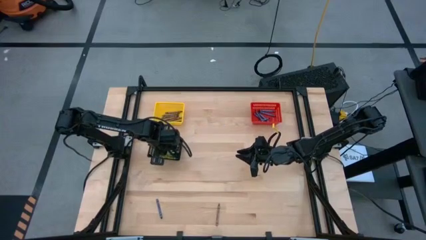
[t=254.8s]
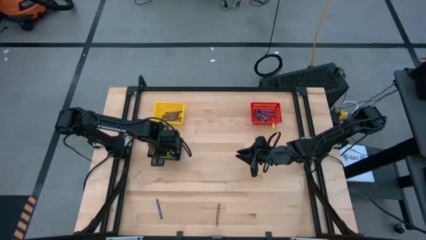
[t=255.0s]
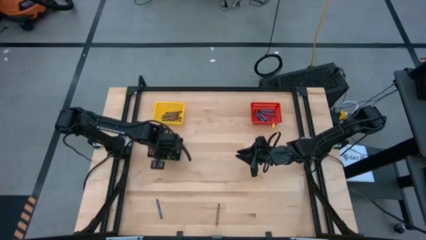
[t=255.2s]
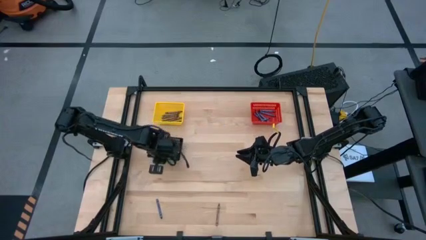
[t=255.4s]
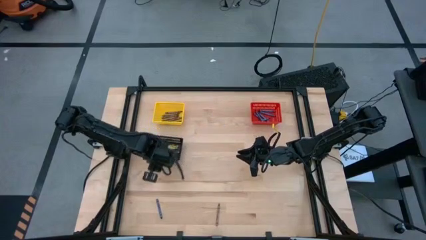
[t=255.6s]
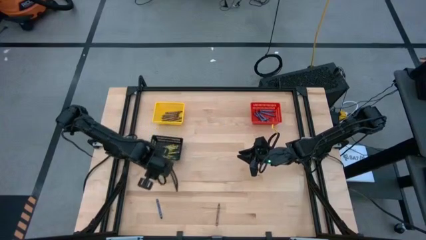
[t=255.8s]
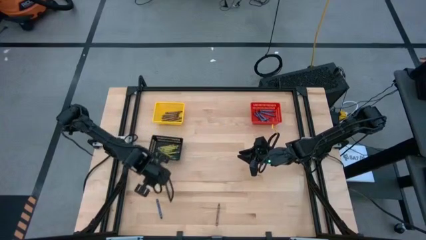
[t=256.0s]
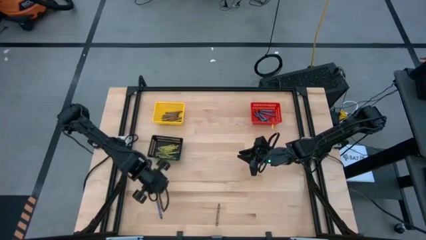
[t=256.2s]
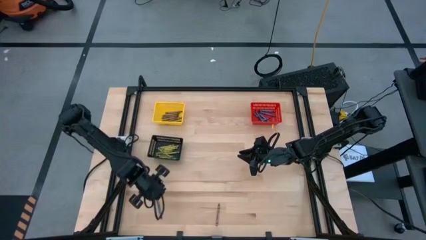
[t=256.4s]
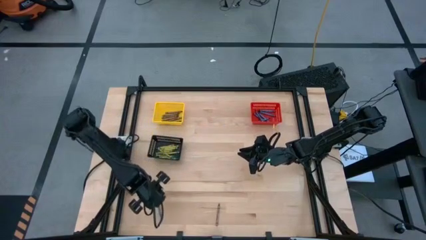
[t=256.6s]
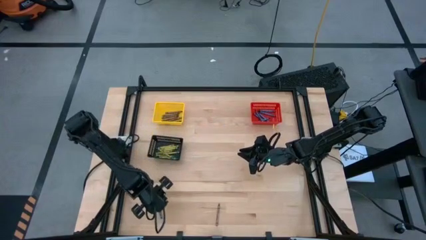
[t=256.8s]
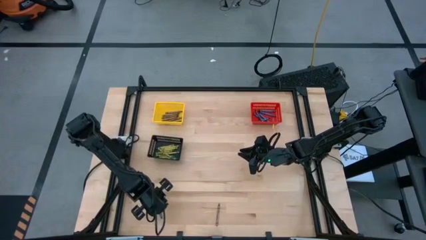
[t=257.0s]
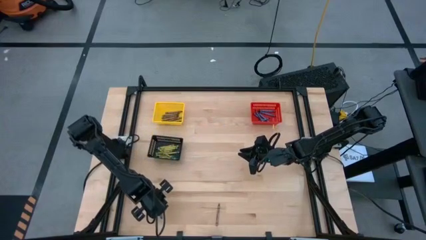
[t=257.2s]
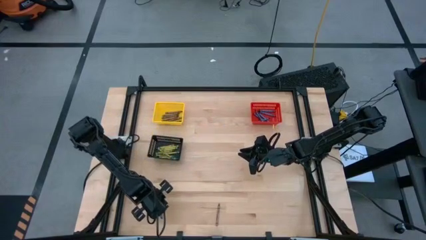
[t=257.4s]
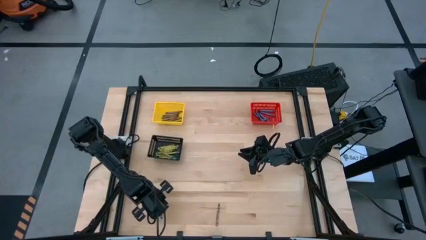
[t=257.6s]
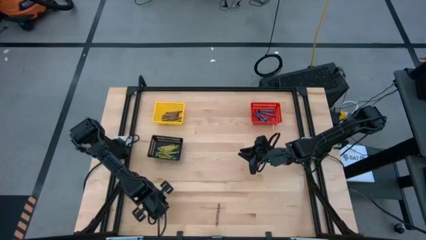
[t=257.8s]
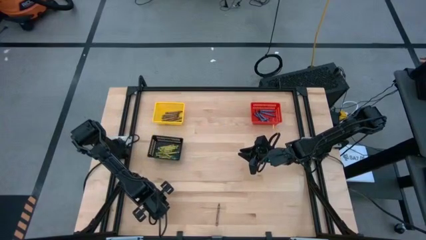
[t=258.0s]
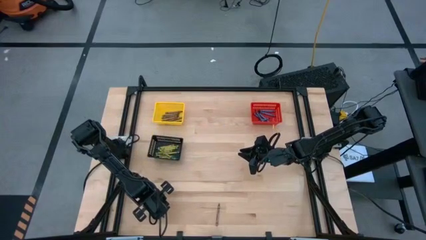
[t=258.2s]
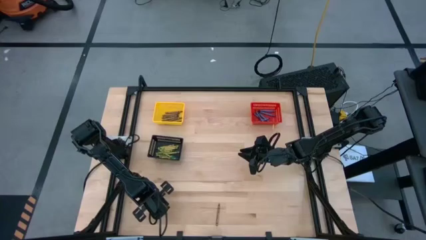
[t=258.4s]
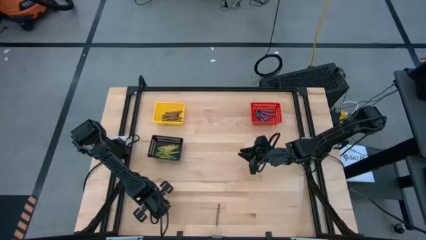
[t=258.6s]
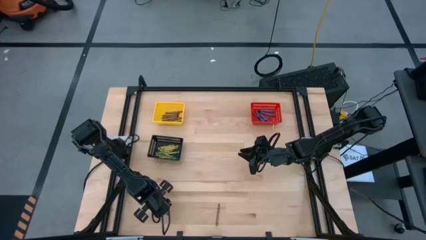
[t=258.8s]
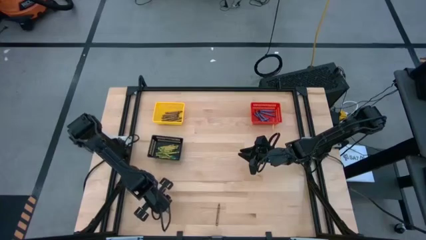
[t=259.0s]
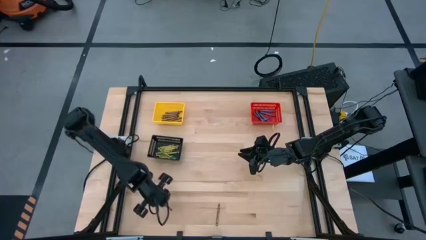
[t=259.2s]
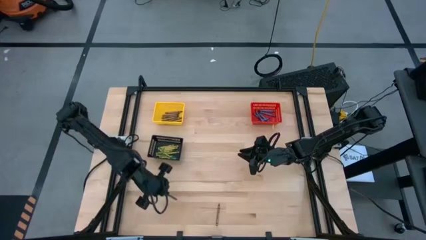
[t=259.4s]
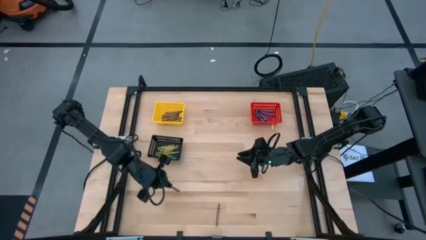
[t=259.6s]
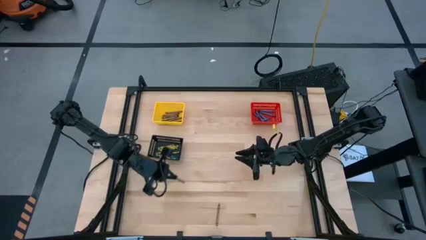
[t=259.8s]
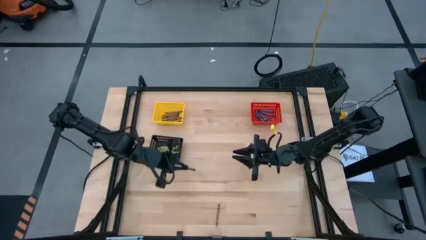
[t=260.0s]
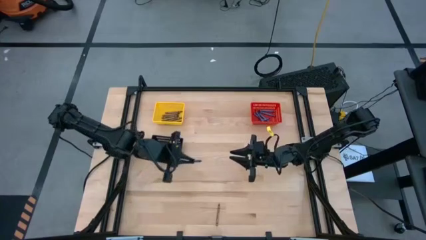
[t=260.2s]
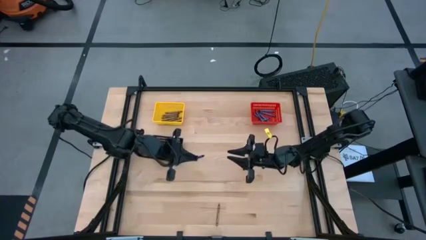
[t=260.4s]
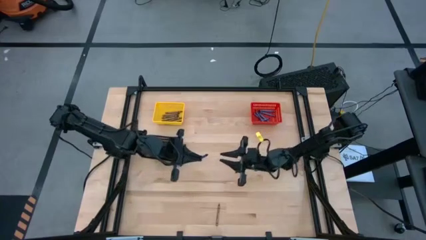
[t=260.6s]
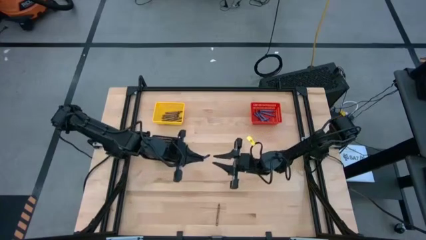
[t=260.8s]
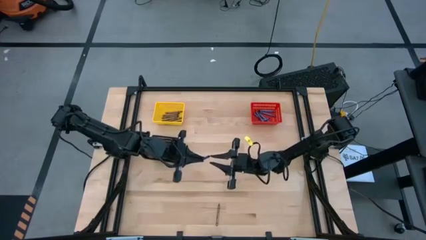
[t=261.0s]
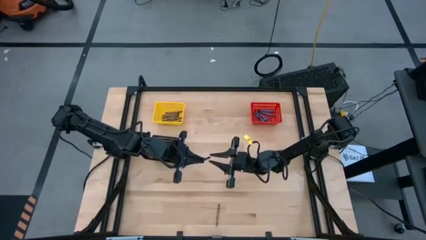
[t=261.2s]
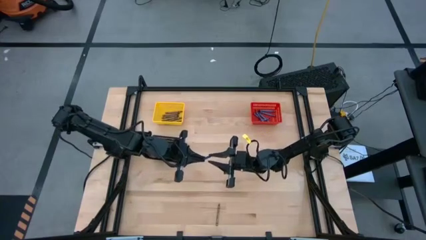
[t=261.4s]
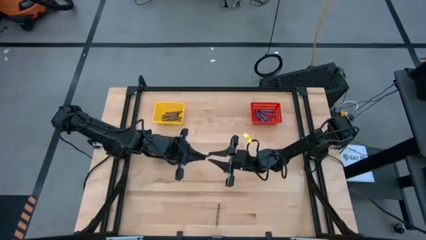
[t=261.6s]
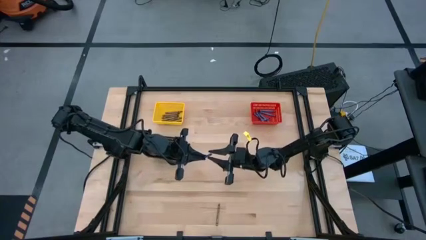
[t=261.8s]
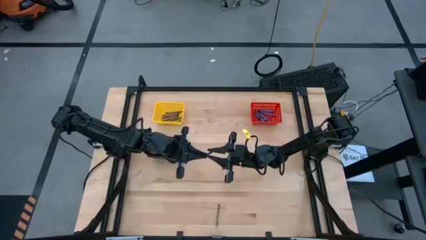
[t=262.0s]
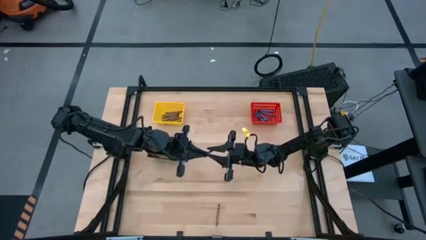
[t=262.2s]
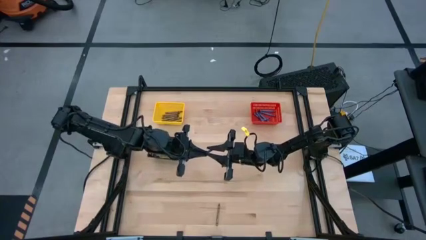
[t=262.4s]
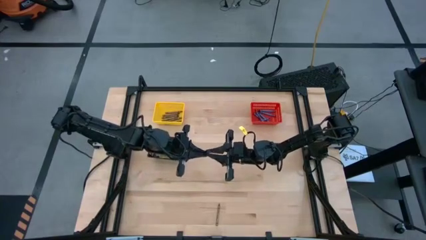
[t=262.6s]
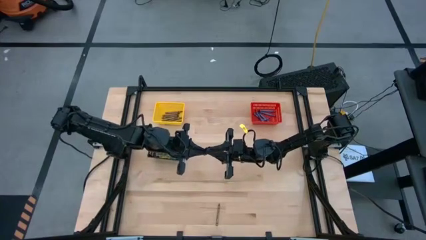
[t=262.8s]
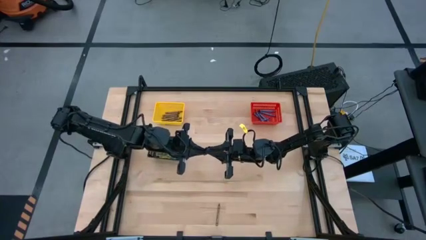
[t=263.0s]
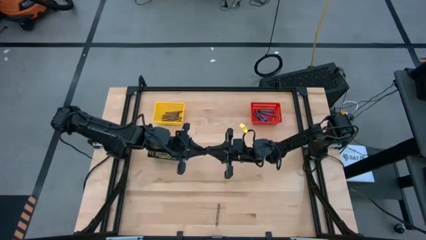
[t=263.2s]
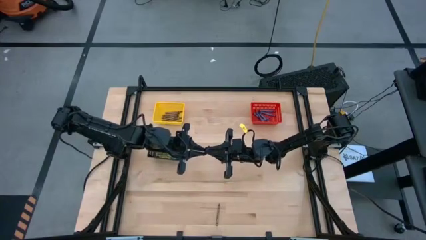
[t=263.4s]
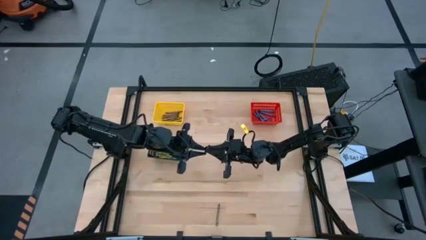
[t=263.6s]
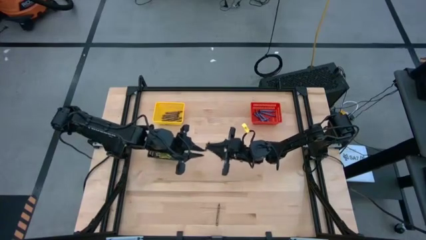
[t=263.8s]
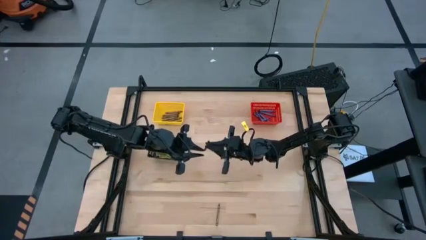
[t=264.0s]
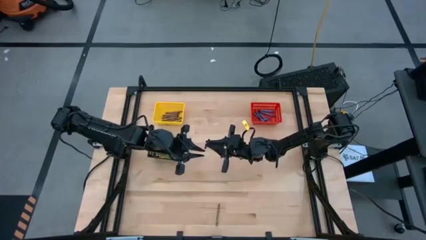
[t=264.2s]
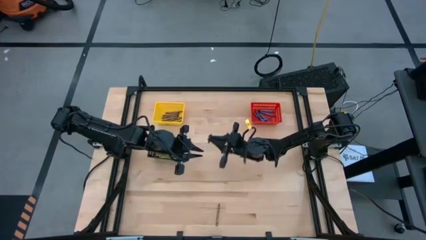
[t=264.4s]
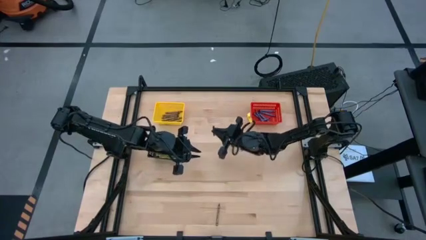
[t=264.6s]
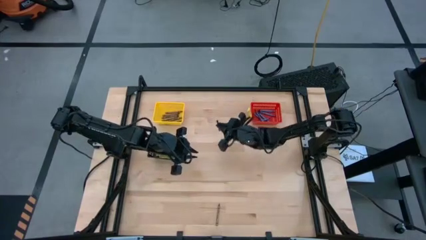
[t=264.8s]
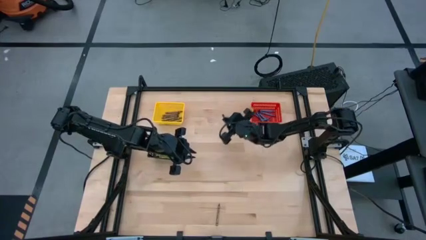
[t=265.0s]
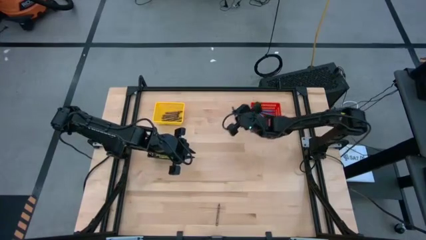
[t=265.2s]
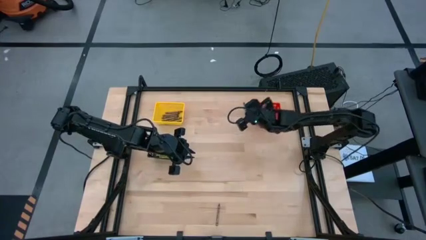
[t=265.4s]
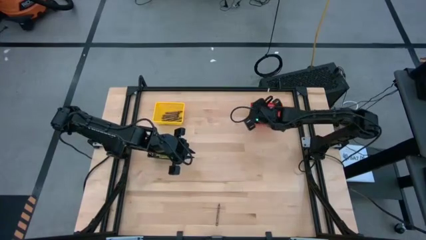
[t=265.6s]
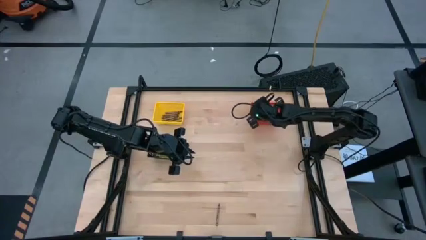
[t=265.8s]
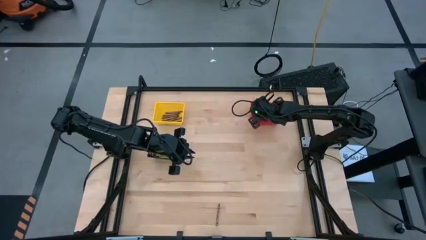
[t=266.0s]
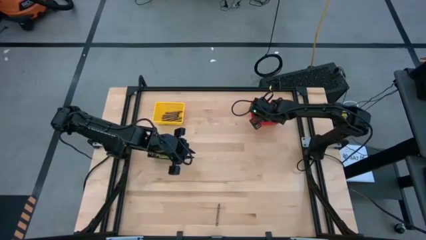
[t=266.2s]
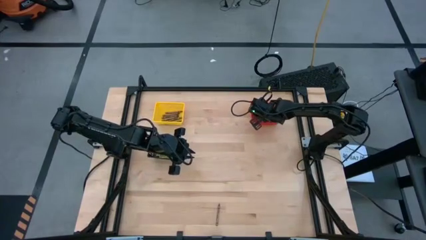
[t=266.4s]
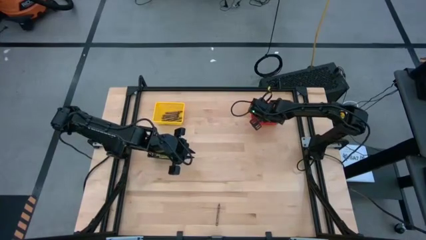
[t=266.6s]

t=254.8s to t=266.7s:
Task: Sort crayons
Put the blue crayon into the red bin

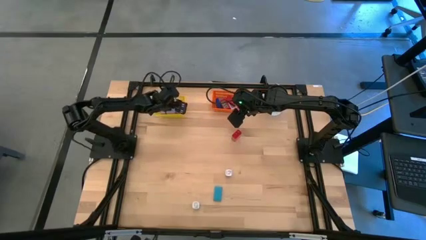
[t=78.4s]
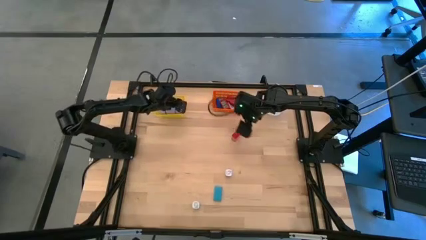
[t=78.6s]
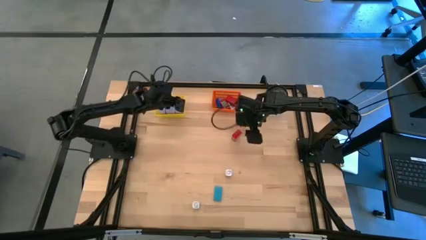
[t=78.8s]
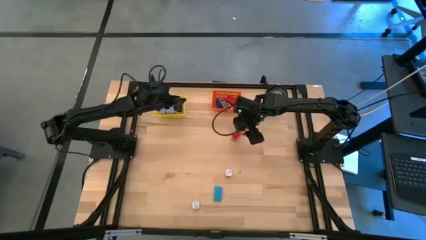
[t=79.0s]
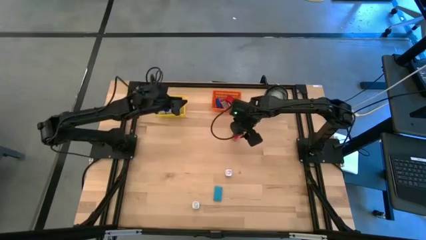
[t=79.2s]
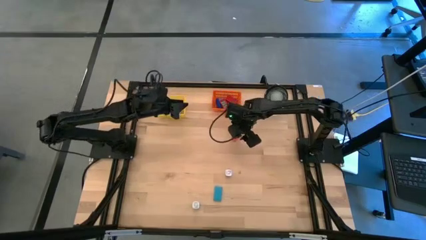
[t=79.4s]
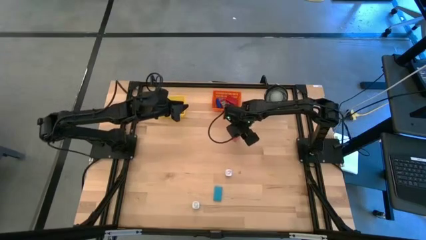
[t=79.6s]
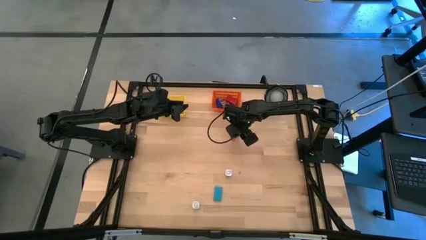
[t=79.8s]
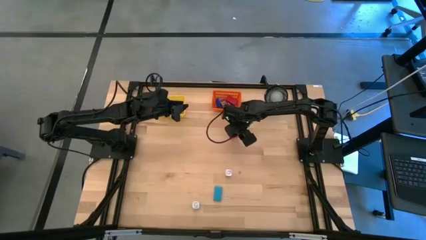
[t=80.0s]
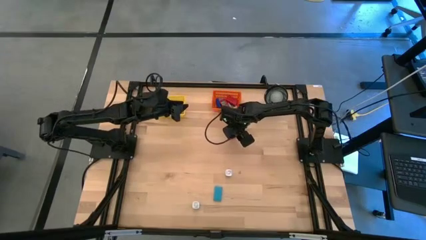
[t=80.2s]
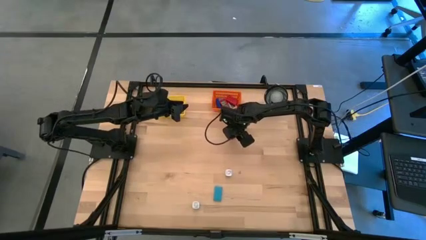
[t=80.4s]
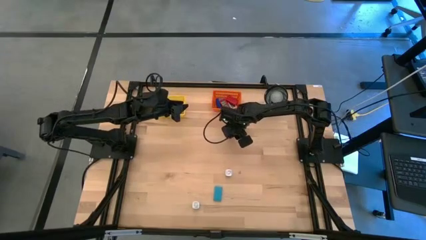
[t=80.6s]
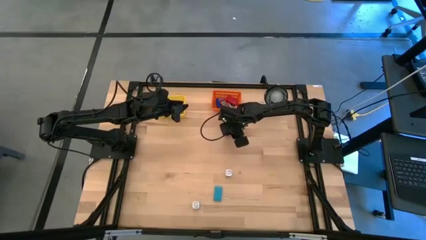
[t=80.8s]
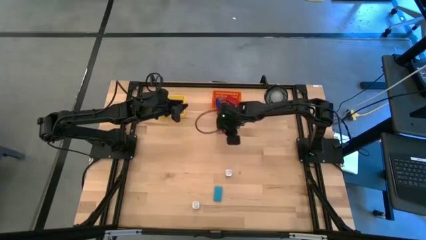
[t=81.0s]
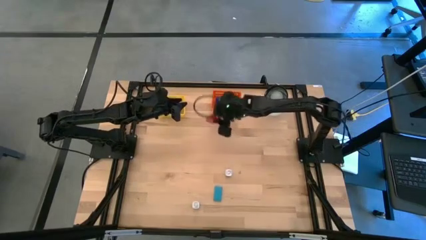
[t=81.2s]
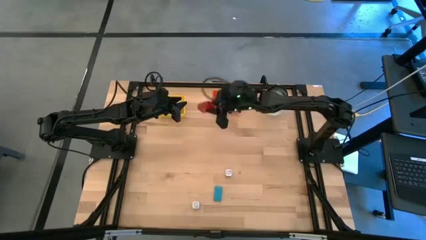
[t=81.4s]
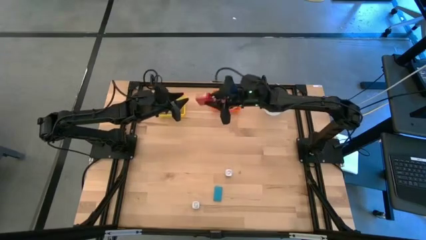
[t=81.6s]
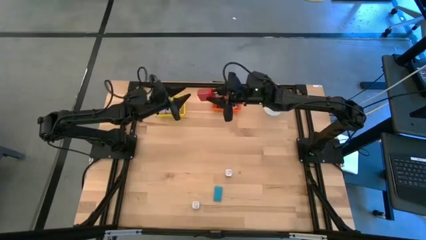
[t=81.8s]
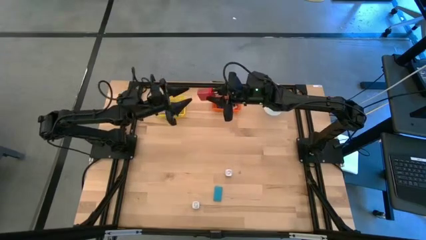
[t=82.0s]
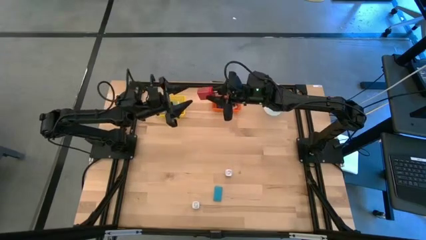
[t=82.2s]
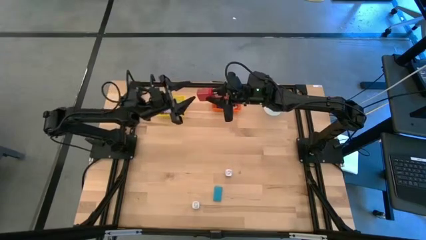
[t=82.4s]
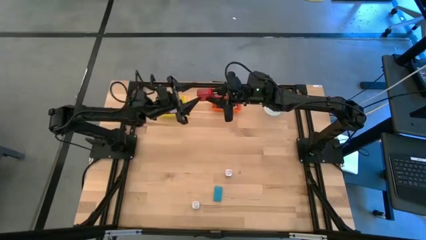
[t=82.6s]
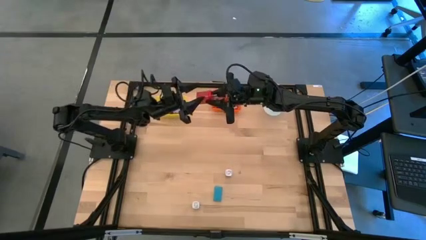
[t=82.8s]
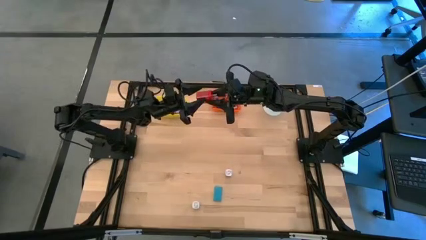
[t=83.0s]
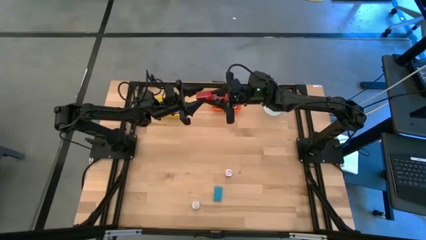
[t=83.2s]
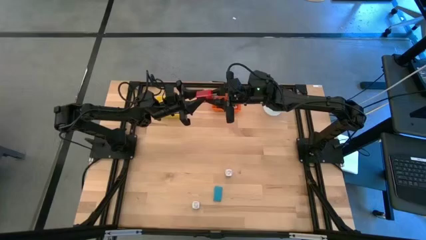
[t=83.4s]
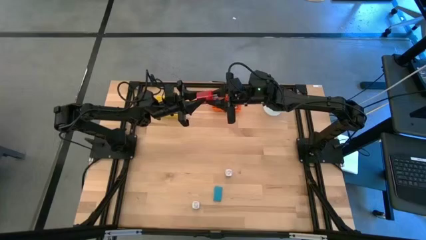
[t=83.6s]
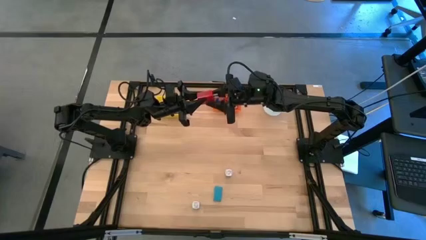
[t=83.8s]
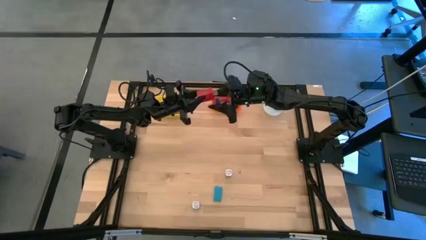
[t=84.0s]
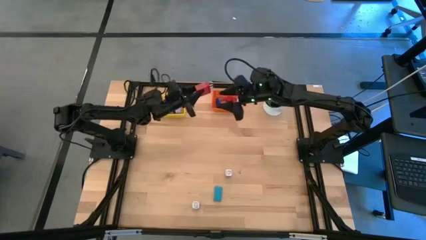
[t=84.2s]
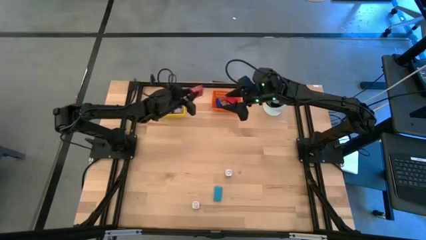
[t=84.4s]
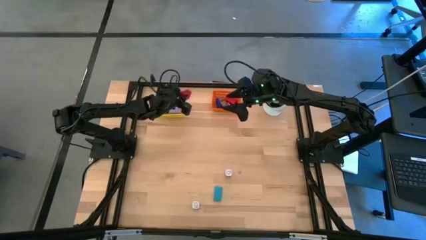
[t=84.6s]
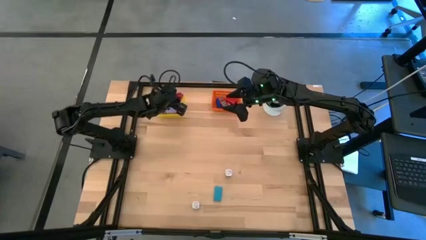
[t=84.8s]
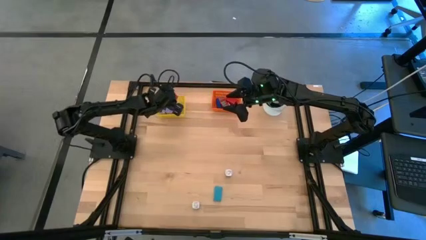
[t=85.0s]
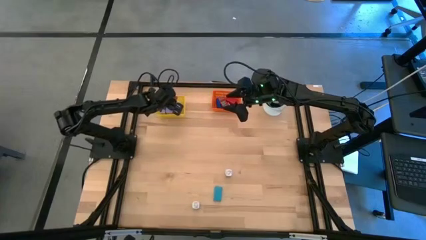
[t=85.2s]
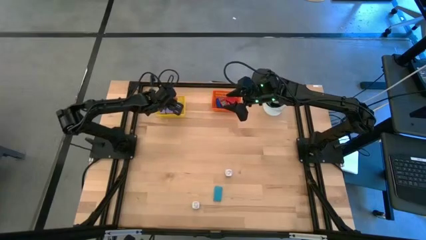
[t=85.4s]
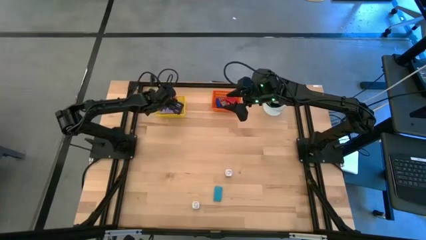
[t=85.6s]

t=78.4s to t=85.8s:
Task: Pick & Place Office items
Put the red changer adapter into the yellow bin
